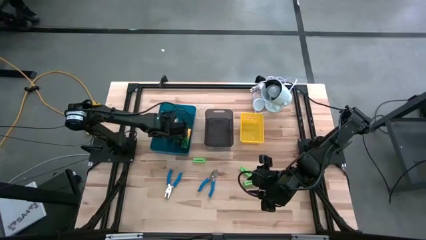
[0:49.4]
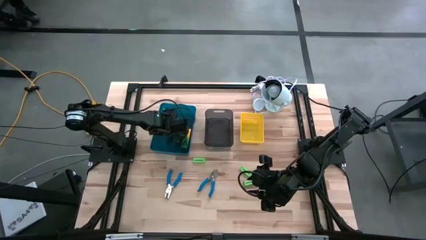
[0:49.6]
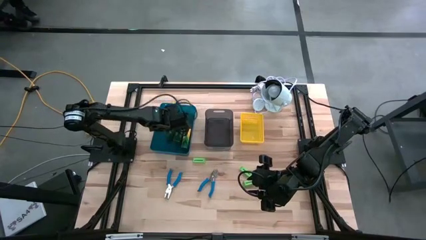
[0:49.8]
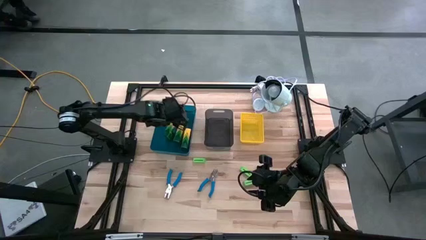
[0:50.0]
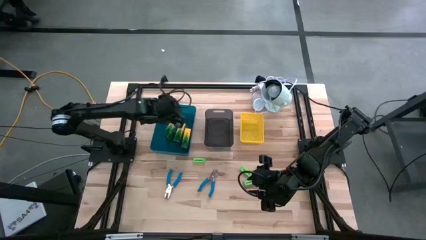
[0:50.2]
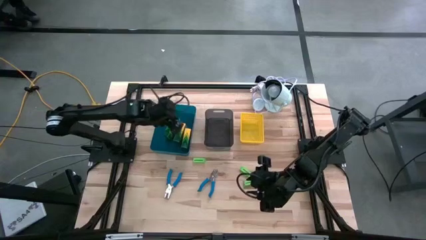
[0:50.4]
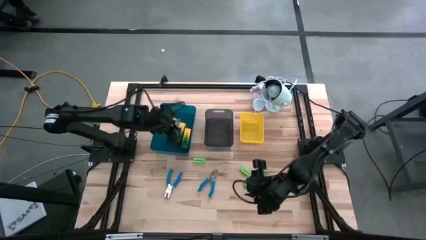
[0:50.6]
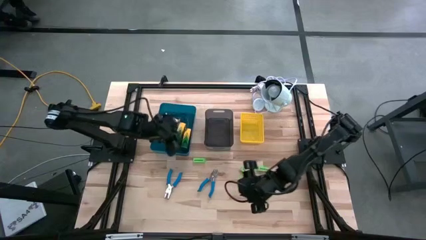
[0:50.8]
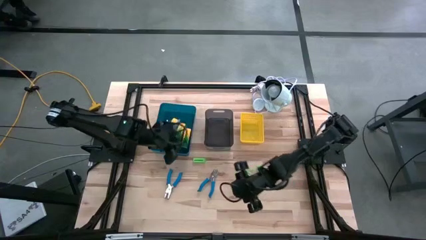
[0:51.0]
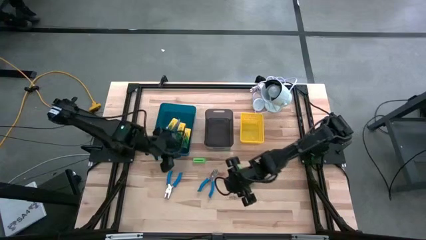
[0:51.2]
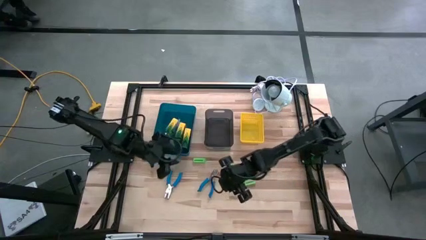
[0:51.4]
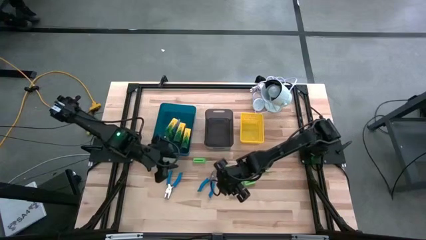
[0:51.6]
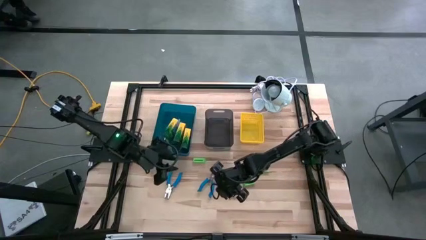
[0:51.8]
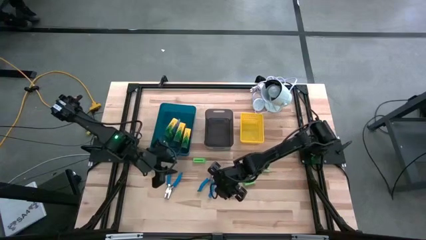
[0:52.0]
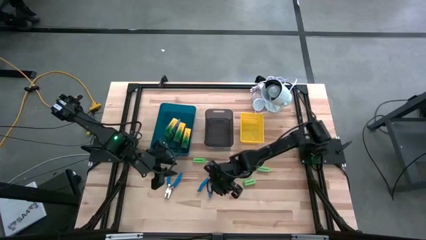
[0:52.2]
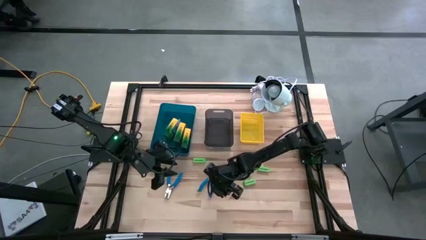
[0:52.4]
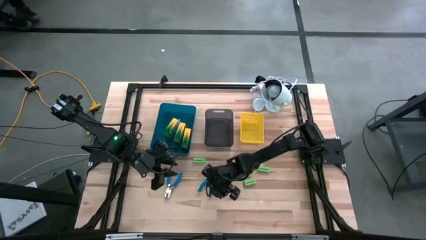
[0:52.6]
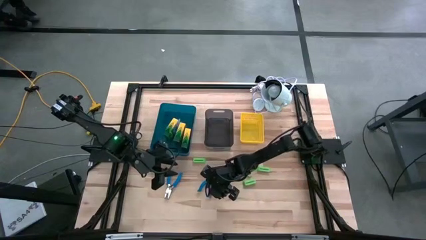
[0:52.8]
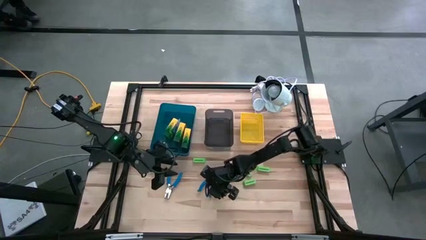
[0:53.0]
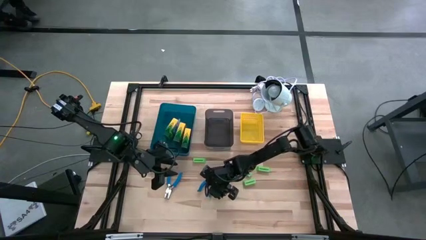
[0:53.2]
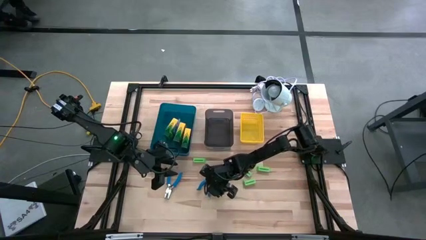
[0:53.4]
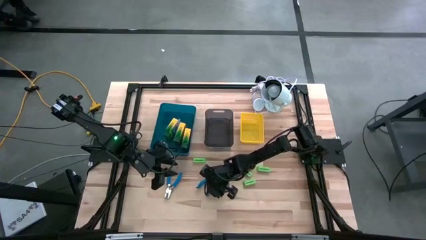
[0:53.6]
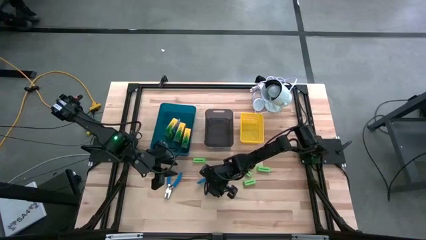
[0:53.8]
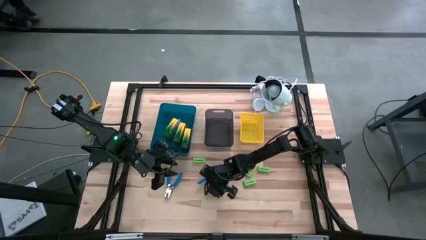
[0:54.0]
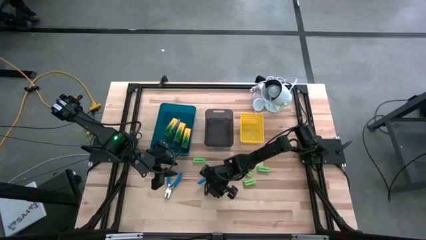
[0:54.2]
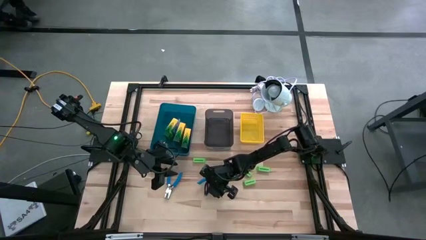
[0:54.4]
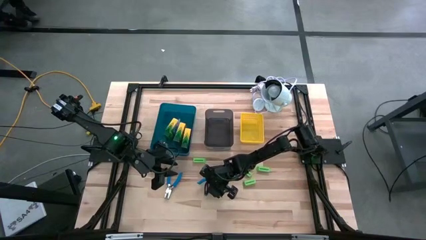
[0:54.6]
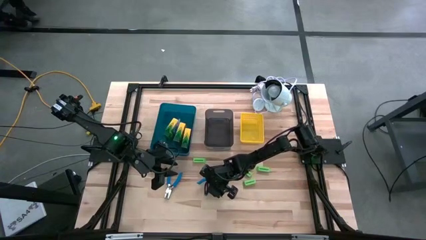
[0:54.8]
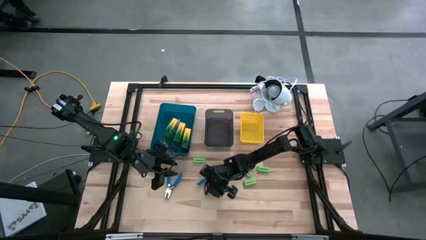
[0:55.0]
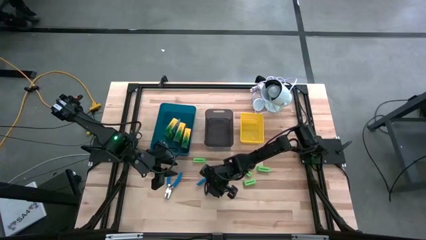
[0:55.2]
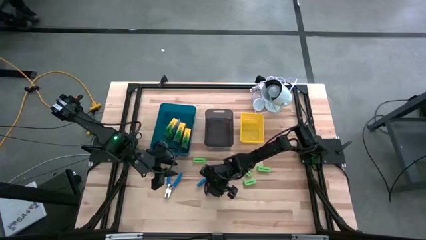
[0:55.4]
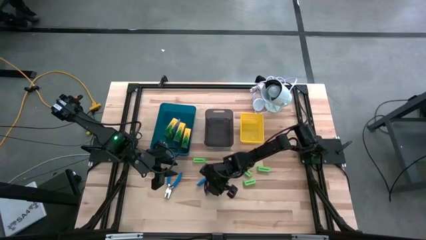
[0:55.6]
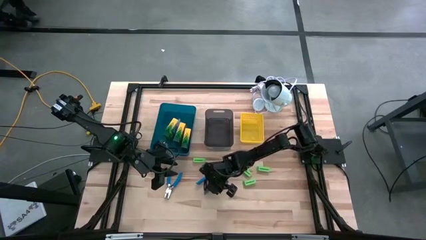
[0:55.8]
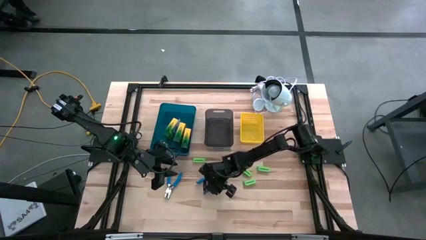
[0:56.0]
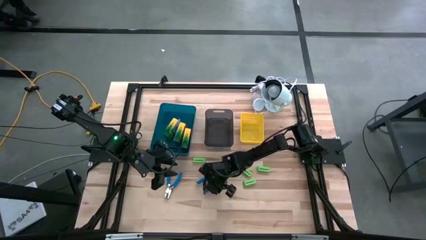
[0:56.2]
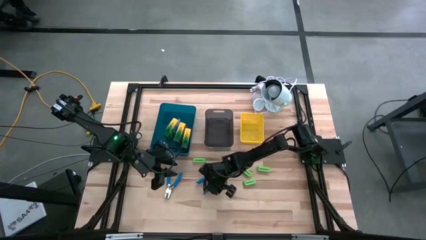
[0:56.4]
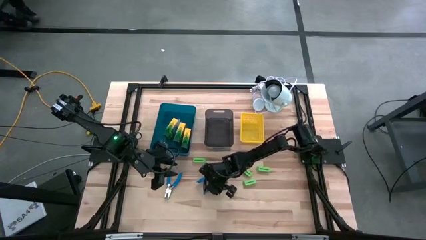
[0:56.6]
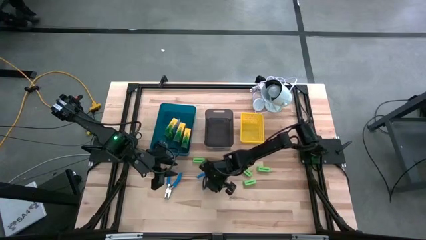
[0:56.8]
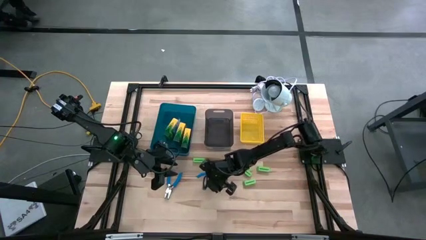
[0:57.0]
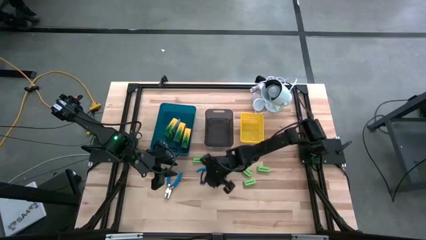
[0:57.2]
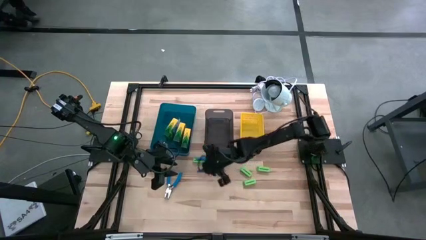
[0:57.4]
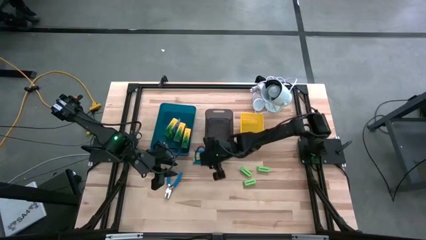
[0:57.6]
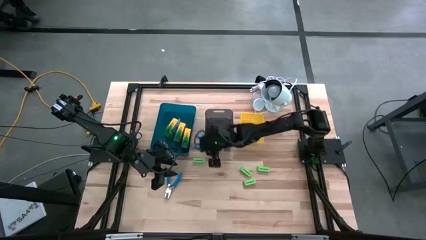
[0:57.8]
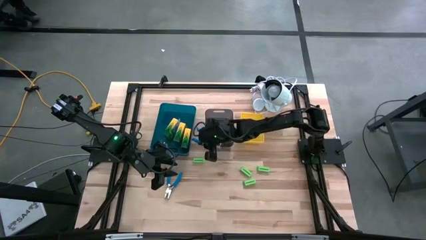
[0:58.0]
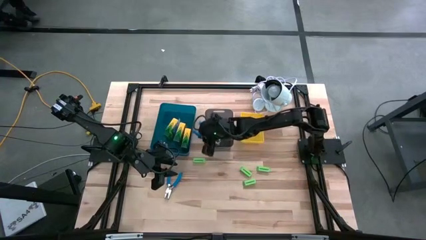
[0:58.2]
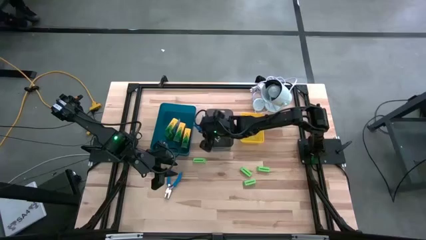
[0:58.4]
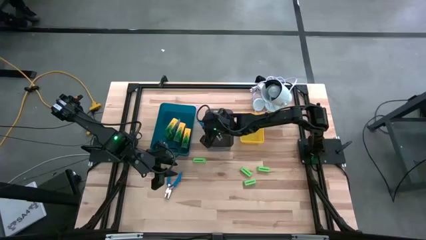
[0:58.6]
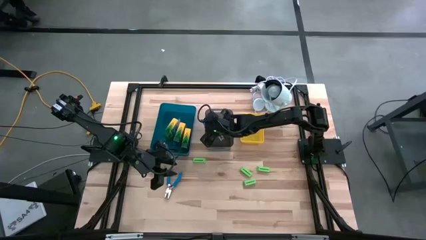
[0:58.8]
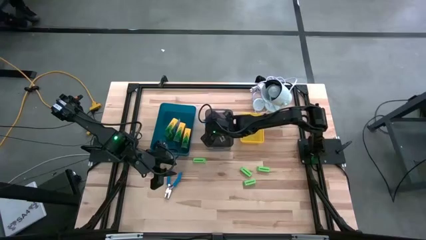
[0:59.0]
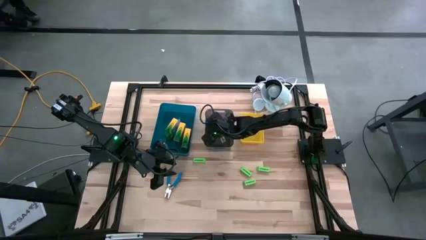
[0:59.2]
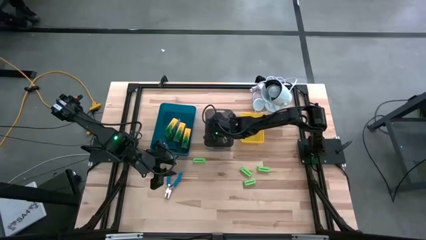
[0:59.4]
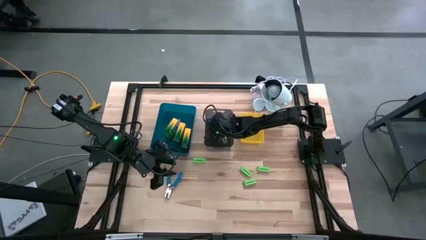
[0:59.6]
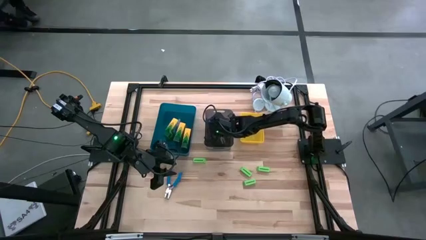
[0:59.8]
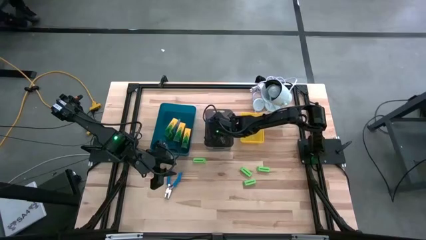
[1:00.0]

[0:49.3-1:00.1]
Task: Pick & Place School Supplies
Put the blue hole puncher into the black bin

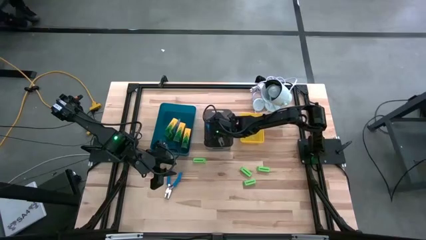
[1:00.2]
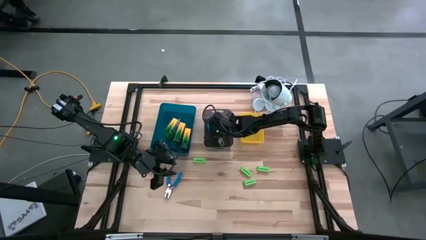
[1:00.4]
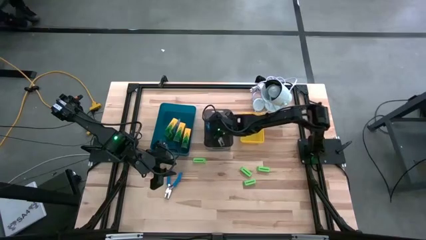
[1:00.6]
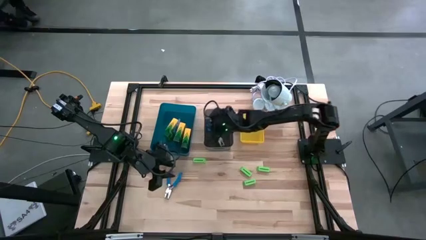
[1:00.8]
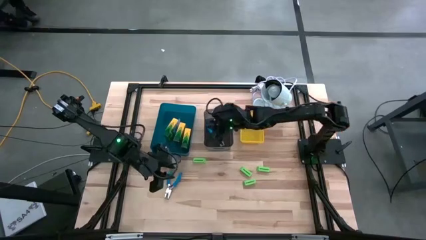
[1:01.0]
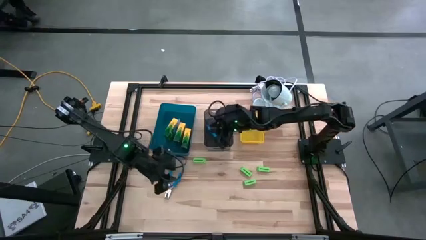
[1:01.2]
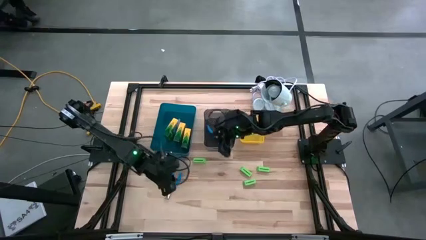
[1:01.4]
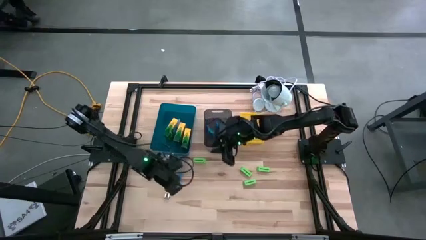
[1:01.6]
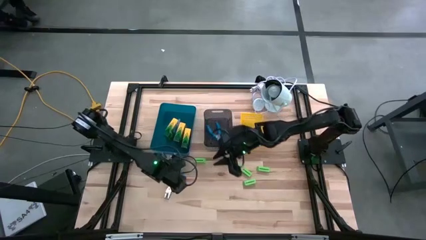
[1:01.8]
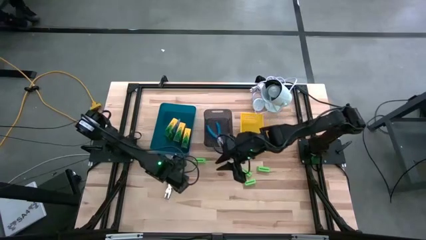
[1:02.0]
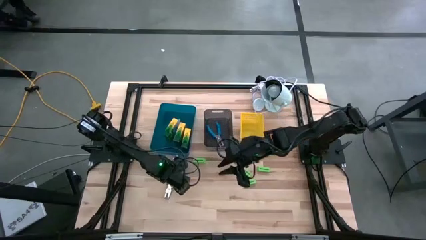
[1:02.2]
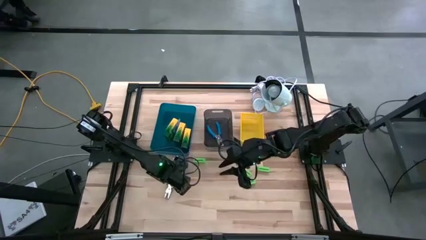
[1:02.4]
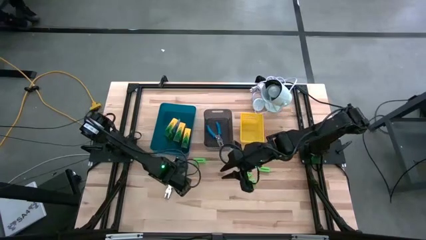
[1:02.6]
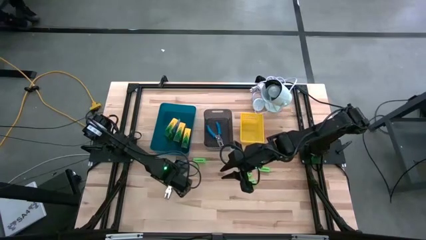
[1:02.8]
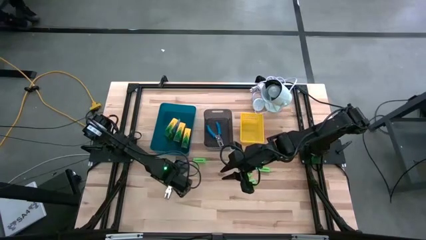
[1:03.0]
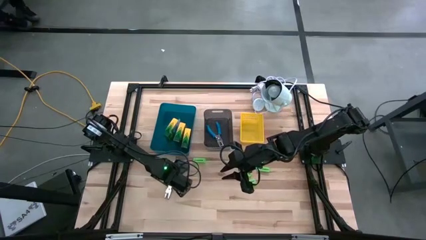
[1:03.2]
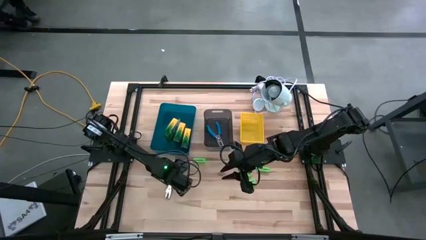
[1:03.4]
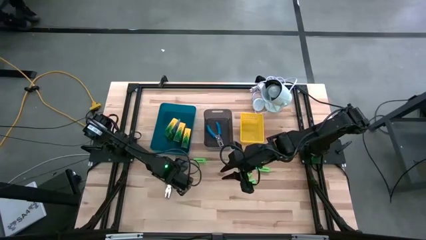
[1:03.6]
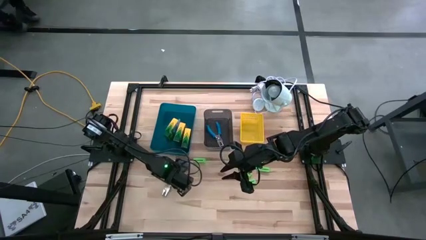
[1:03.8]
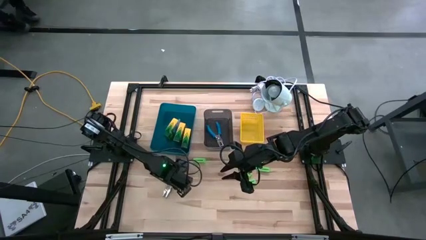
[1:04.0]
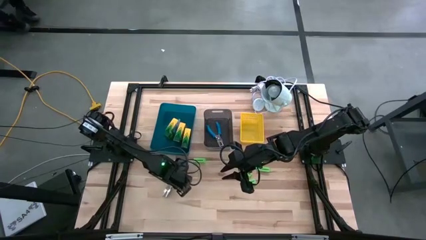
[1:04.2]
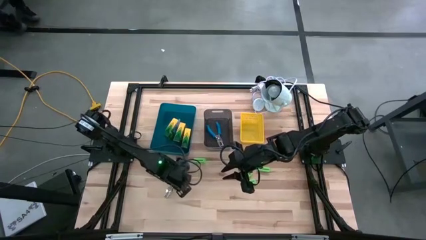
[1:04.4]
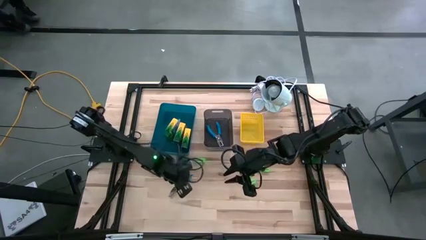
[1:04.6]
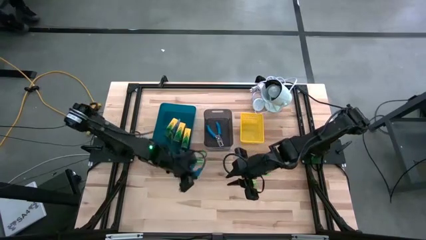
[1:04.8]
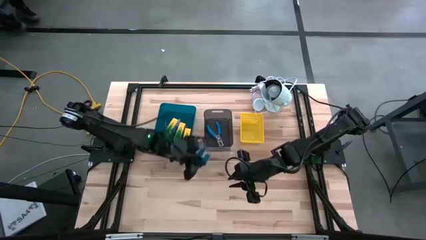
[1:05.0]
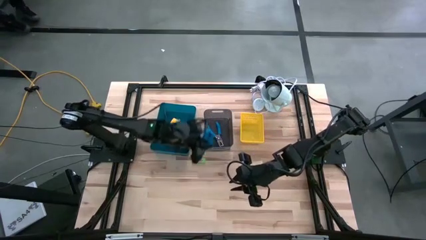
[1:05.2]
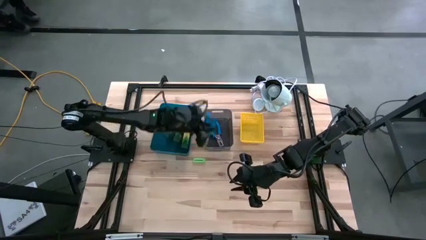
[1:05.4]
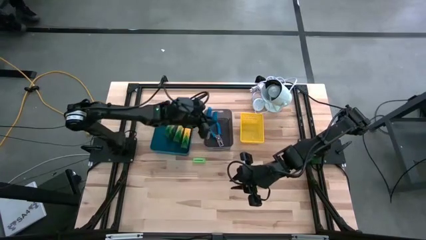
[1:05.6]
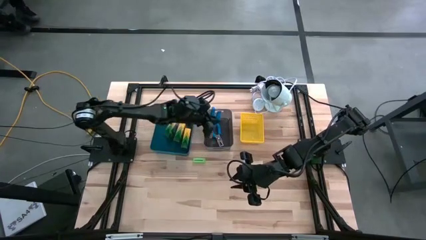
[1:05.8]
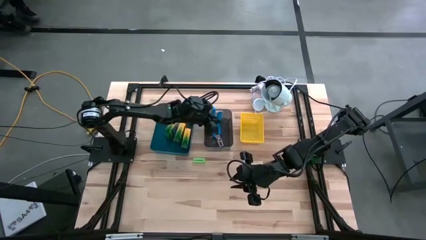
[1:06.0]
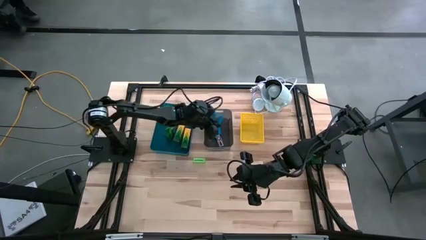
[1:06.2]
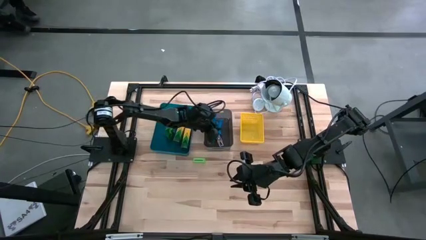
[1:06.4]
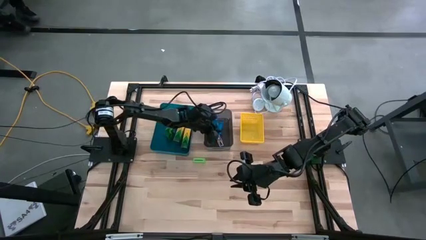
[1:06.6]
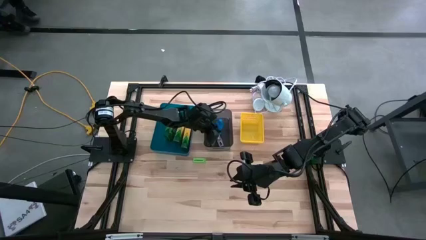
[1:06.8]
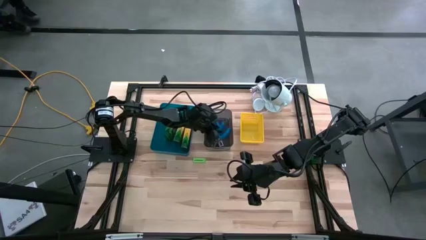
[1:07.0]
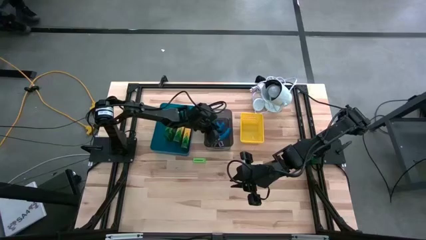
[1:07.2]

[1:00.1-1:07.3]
Put the blue hole puncher into the black bin
